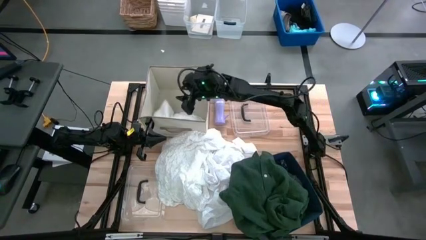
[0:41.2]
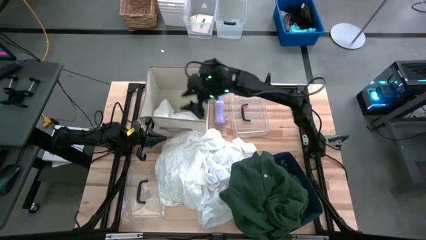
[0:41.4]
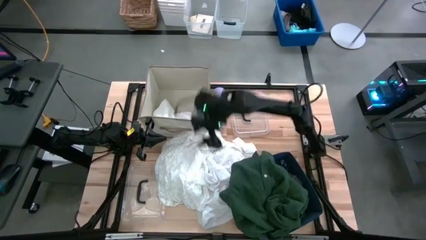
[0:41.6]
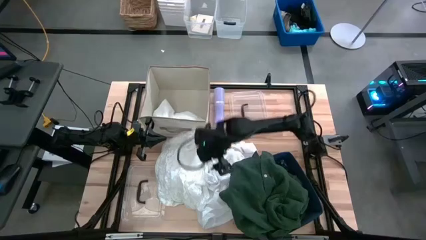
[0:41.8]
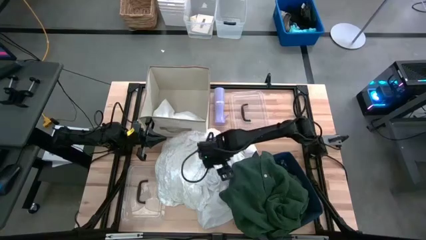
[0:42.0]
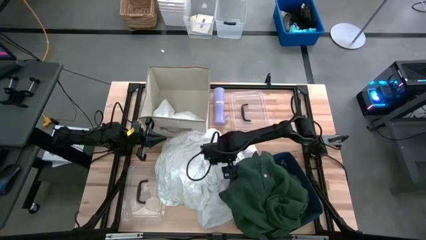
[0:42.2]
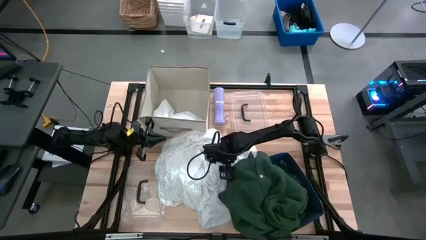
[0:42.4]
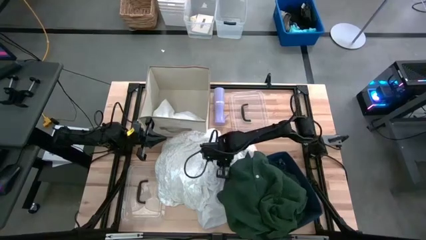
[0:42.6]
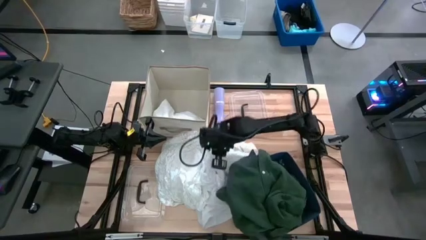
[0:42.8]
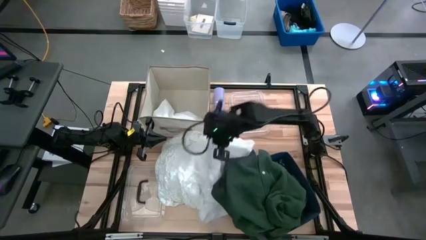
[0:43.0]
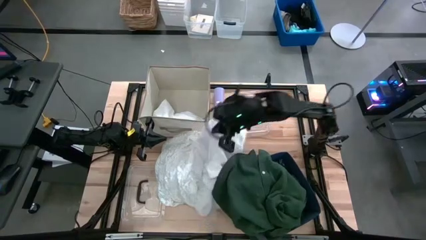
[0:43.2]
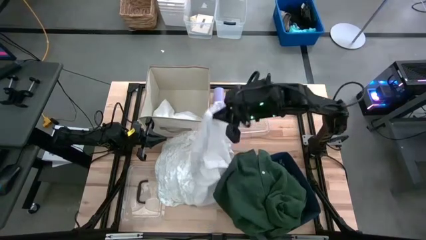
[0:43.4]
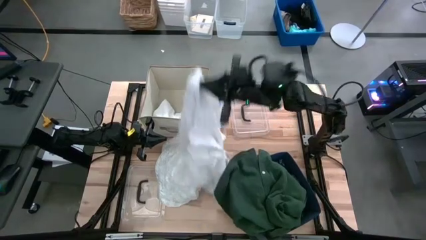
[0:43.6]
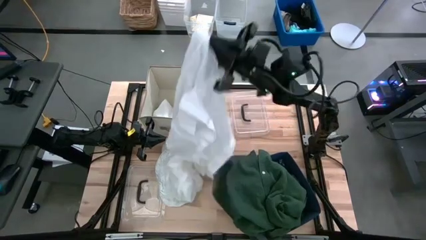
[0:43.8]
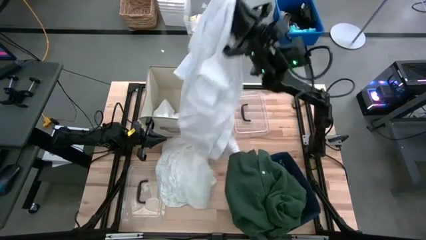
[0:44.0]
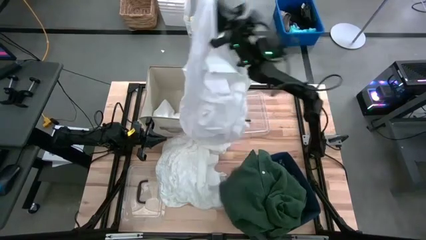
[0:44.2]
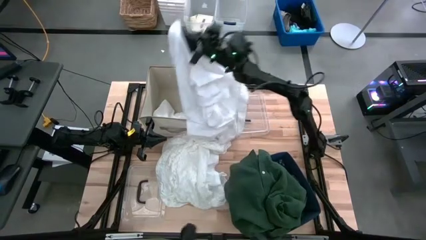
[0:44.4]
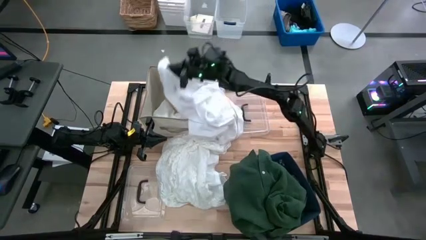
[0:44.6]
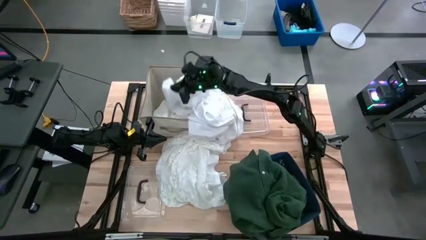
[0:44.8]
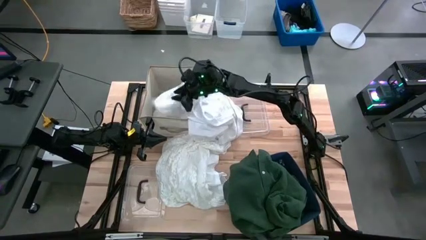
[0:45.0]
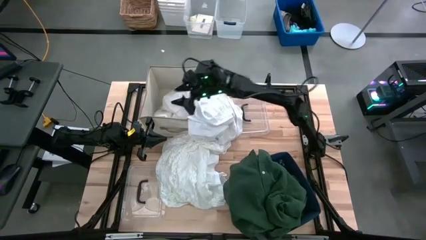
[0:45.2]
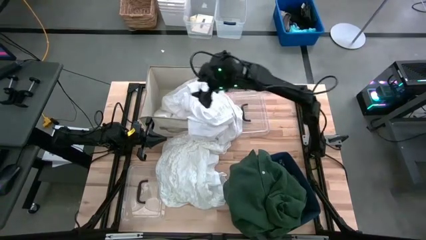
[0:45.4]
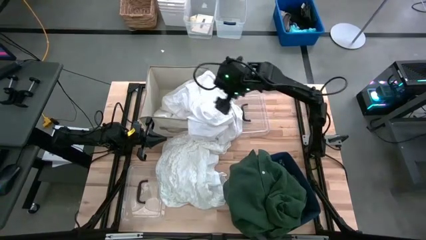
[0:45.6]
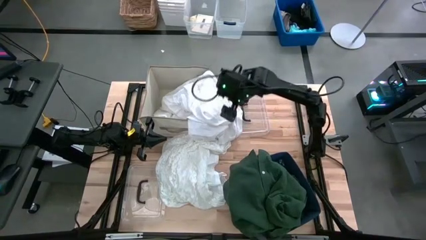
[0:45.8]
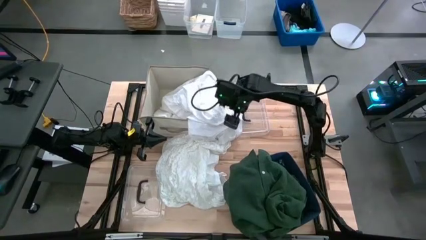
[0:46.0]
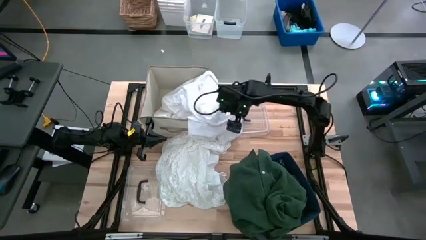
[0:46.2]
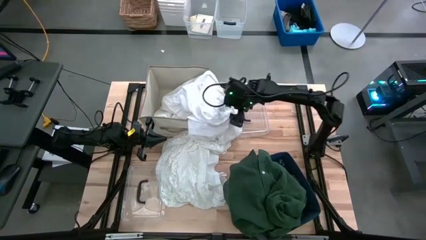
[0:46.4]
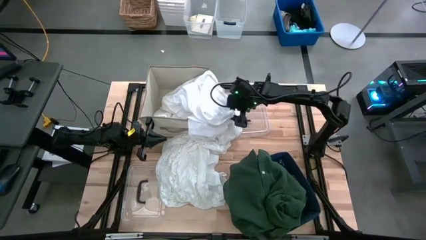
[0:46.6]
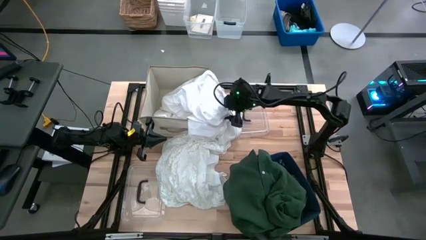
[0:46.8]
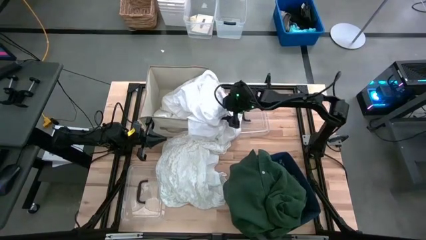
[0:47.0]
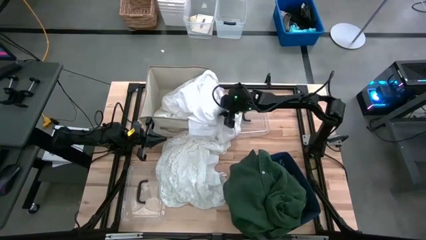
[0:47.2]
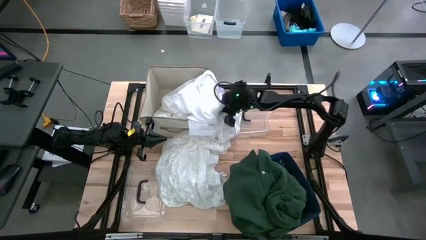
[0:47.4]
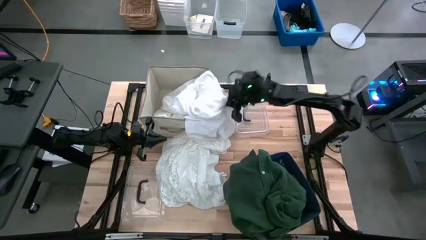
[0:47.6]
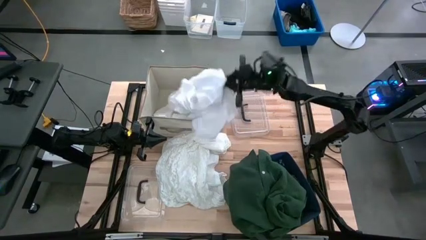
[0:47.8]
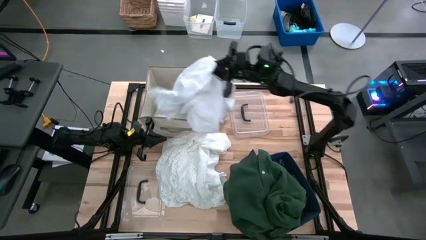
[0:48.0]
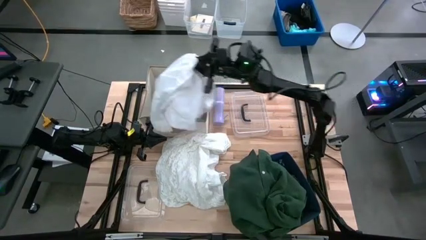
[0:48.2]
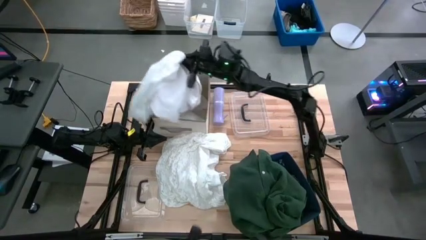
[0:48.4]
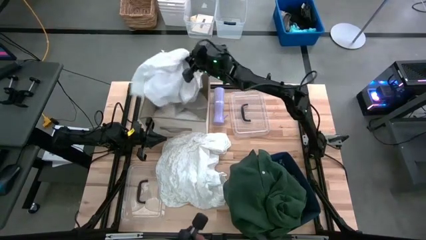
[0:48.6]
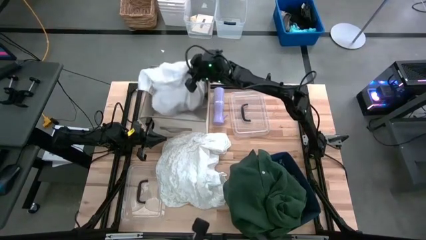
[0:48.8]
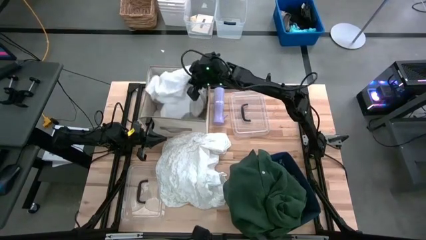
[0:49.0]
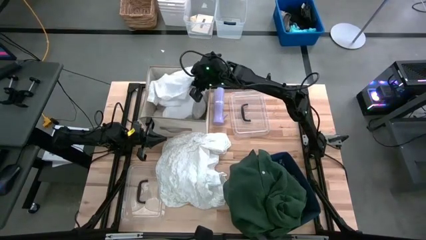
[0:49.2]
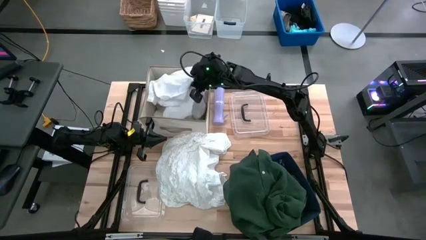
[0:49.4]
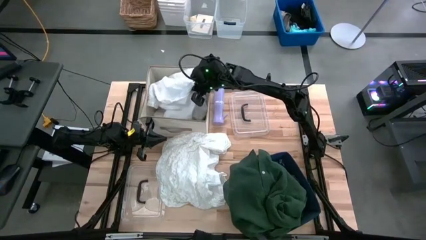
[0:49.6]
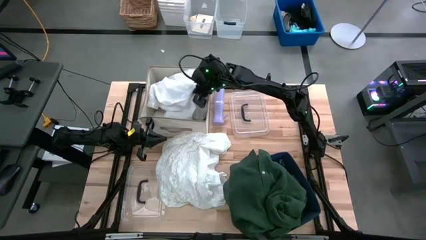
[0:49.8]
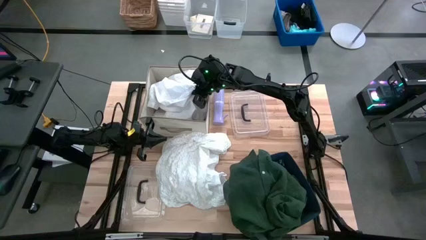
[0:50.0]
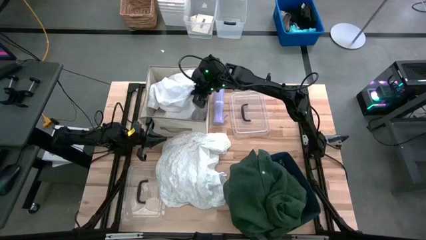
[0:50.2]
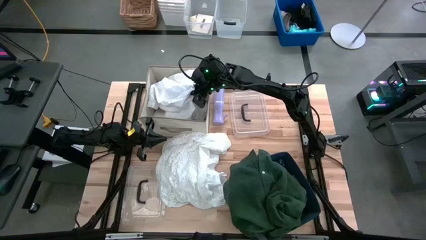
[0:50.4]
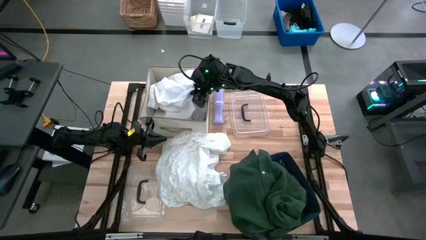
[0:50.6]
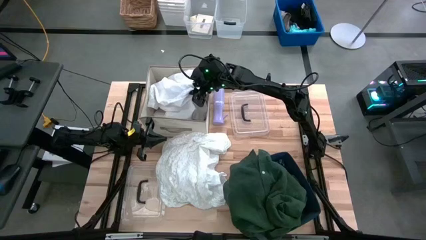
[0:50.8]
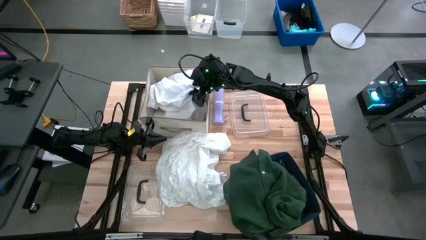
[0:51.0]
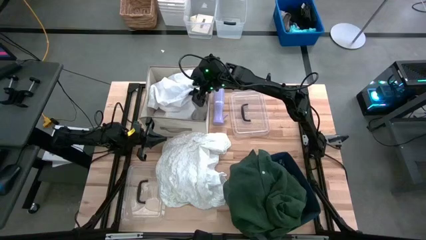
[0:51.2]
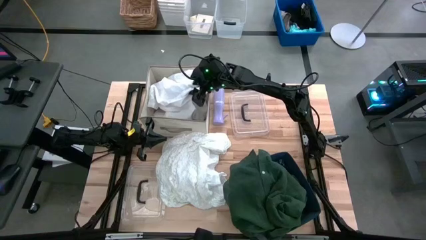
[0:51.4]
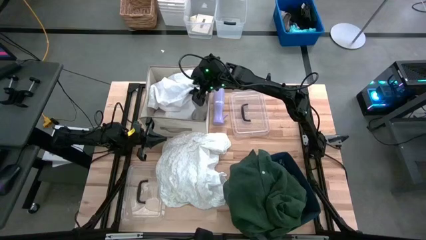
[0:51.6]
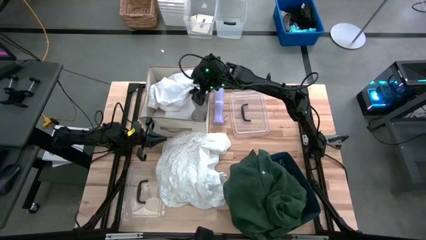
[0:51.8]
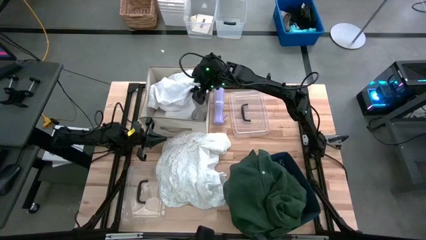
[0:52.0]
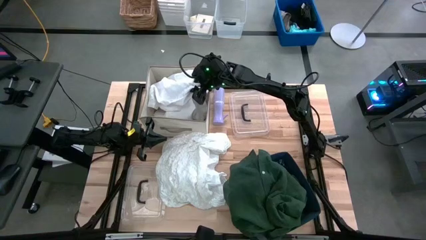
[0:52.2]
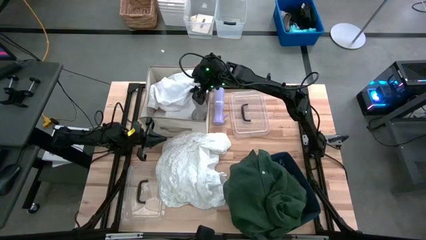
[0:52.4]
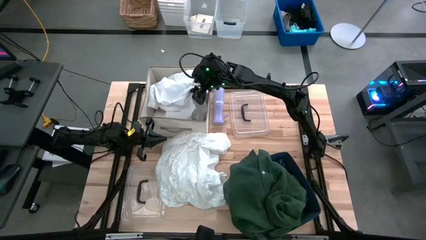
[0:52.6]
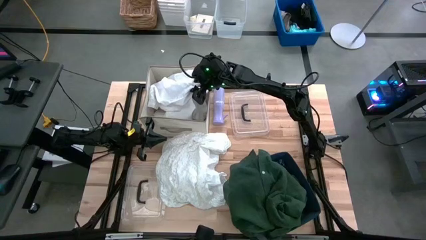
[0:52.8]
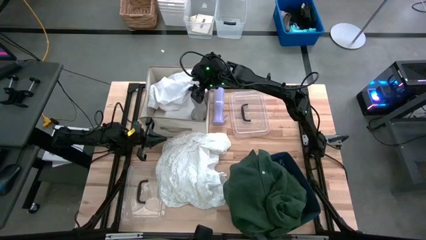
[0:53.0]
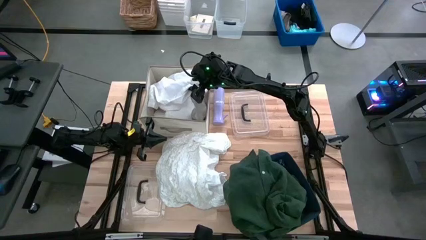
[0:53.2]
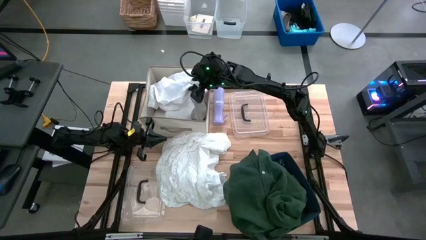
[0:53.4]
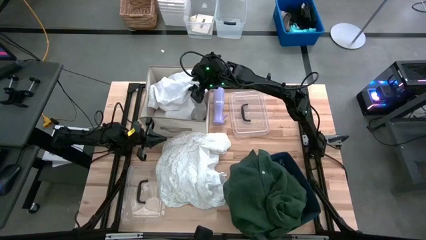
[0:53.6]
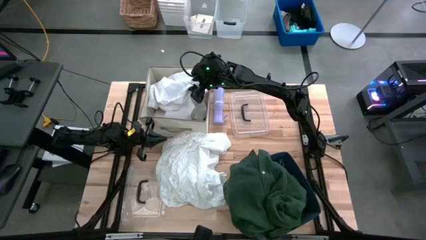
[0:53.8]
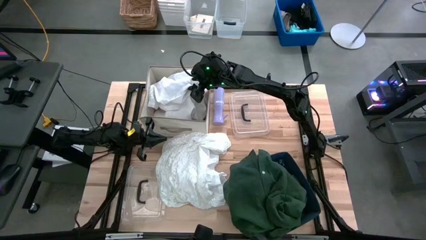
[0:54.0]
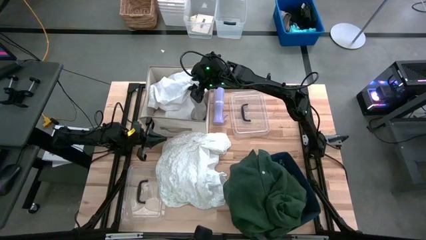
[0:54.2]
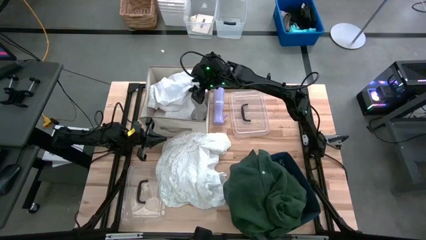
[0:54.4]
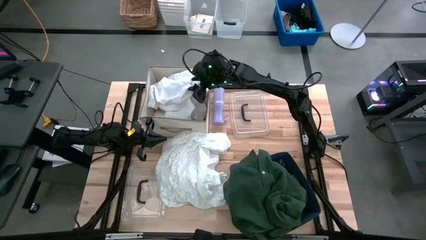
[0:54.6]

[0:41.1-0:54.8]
Task: Sort clothes
Put the white shirt into the light brown laundry organizer

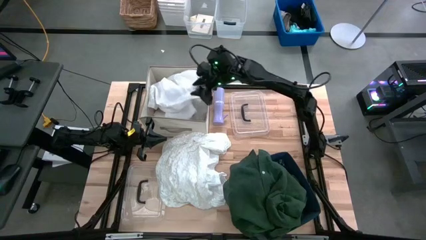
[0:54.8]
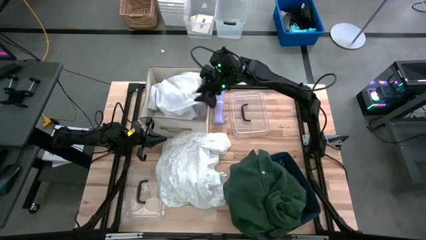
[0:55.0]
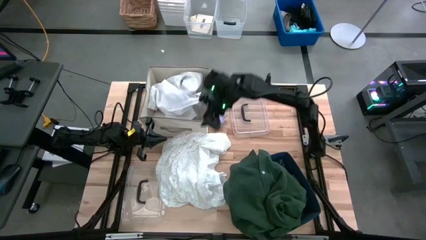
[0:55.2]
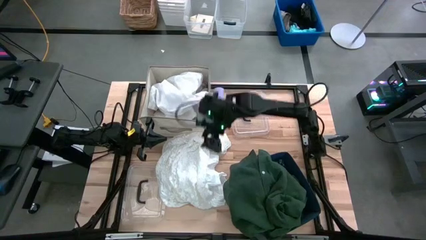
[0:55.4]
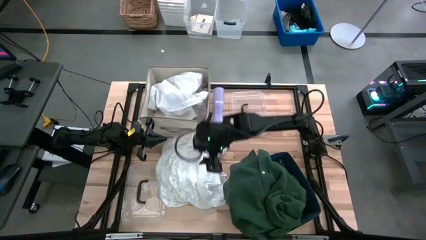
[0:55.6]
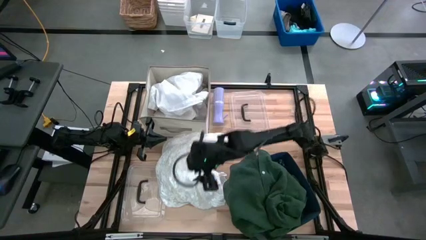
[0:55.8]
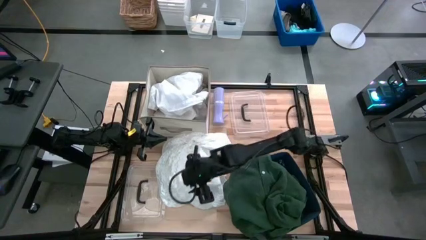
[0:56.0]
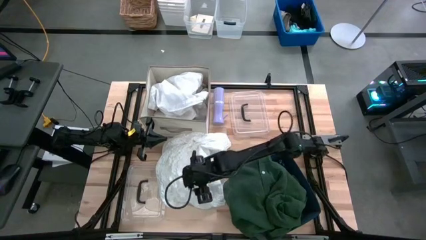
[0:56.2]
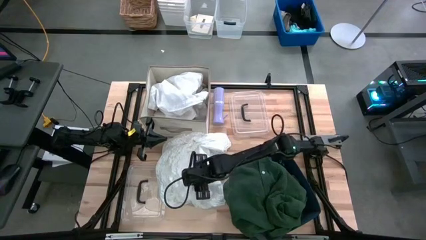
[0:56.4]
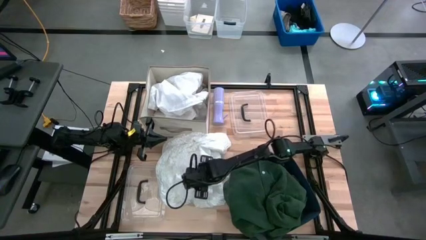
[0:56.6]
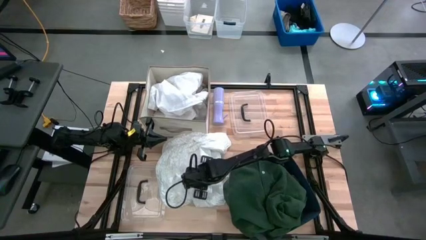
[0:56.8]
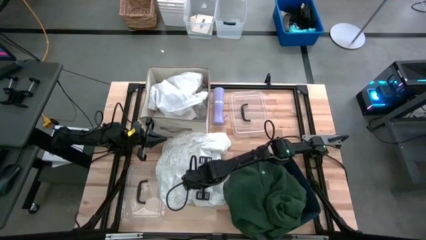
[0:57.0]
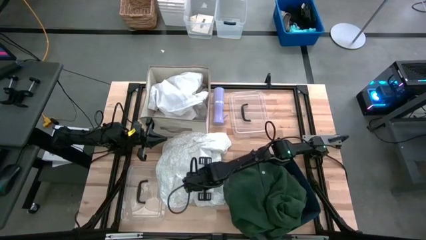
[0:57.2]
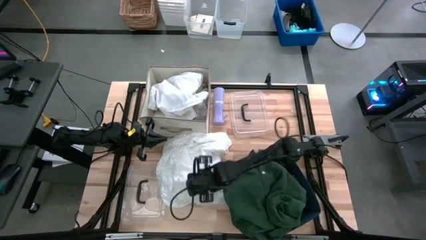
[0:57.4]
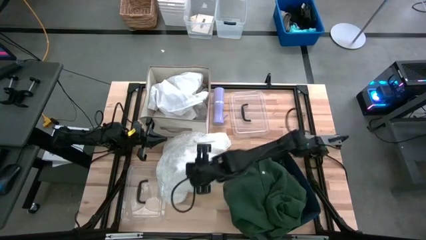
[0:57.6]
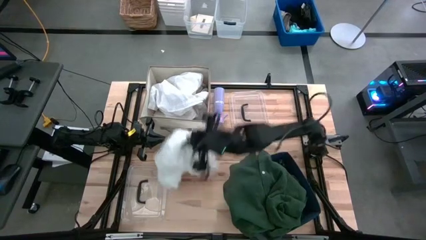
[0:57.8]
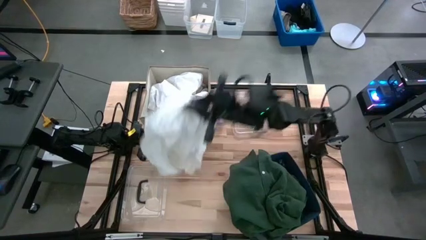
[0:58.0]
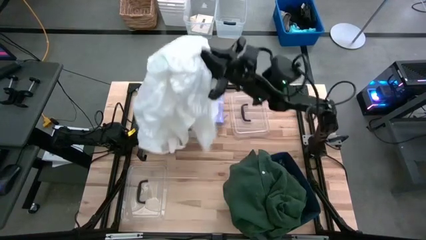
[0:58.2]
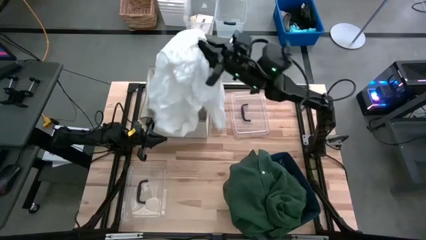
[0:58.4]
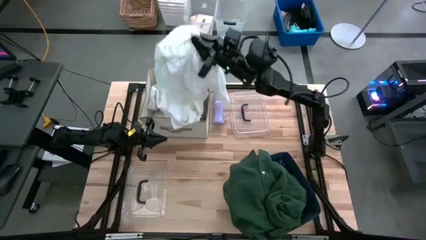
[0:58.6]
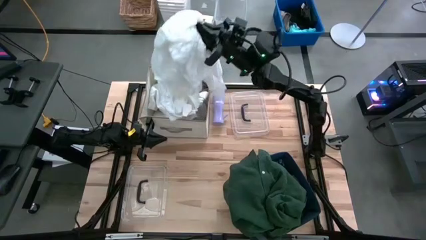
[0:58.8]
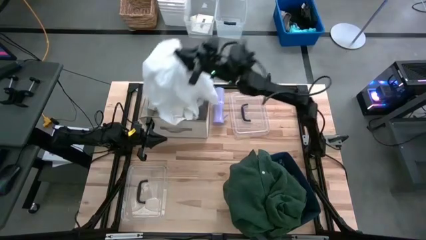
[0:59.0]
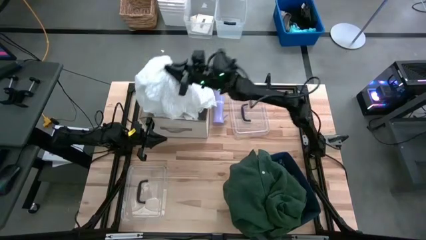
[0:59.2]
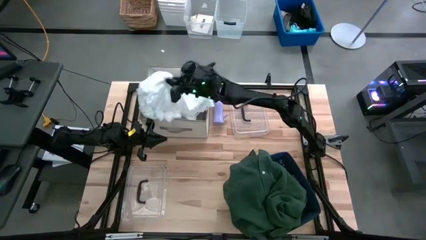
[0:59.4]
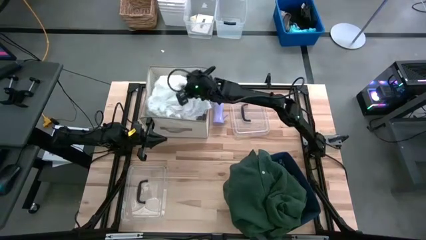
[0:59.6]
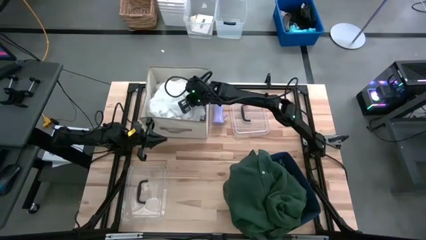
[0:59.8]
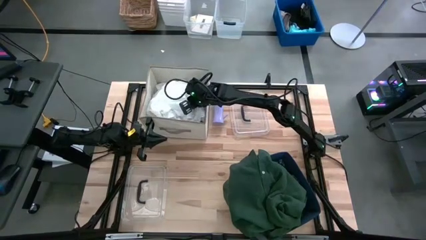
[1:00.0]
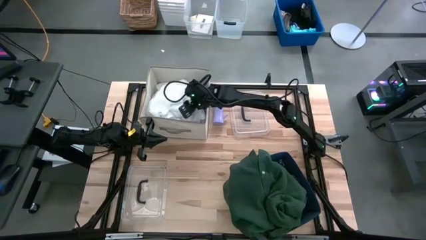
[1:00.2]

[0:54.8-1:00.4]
Put the white dress into the light brown laundry organizer
